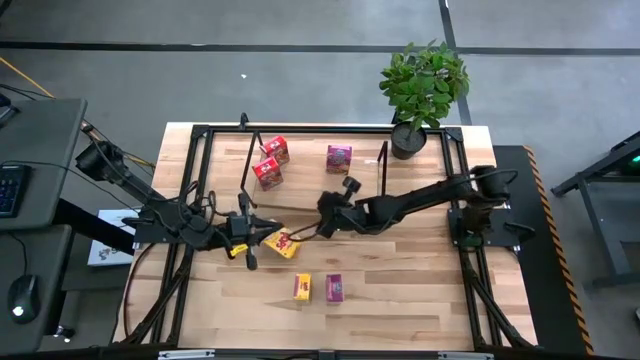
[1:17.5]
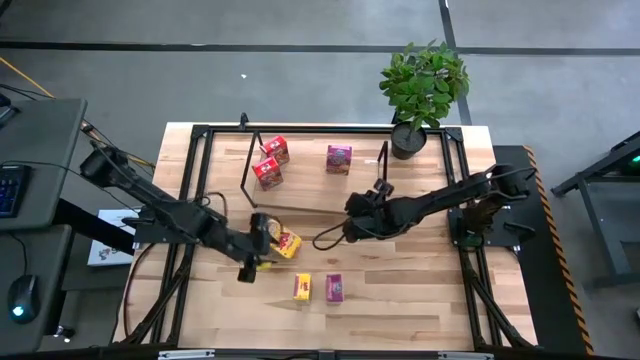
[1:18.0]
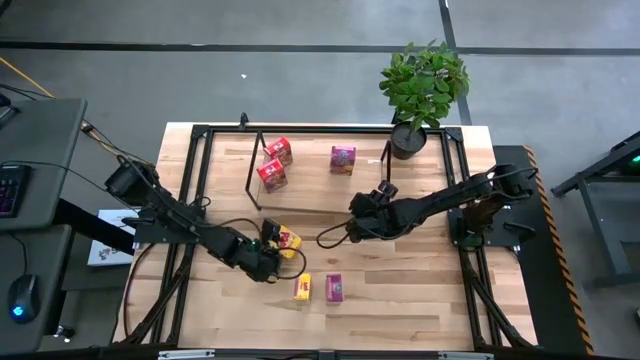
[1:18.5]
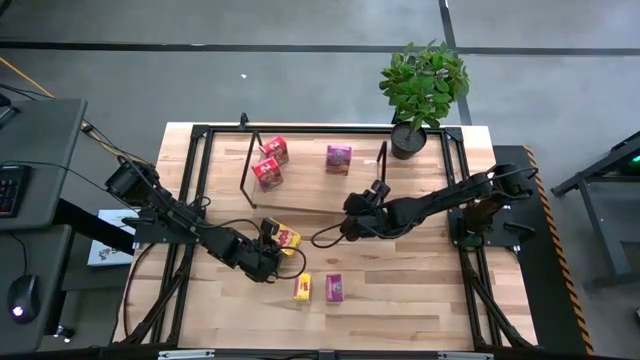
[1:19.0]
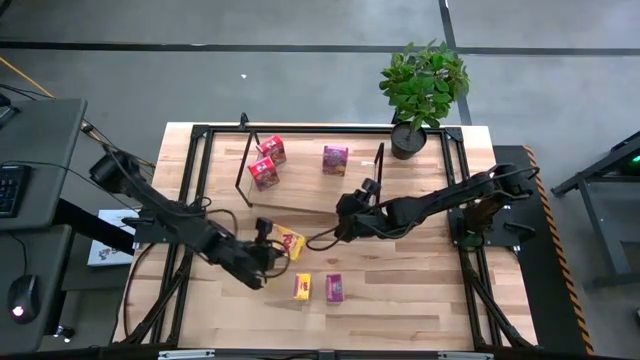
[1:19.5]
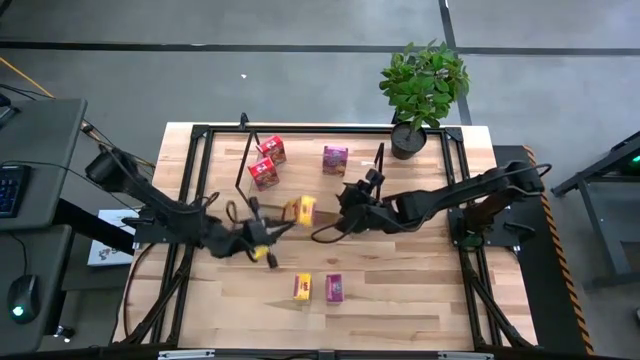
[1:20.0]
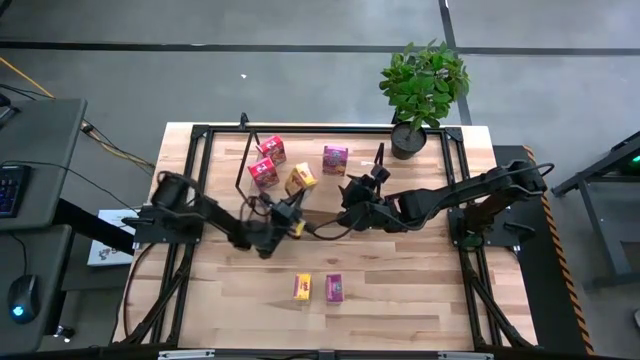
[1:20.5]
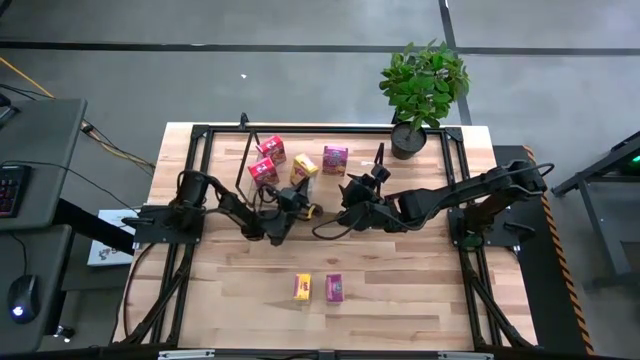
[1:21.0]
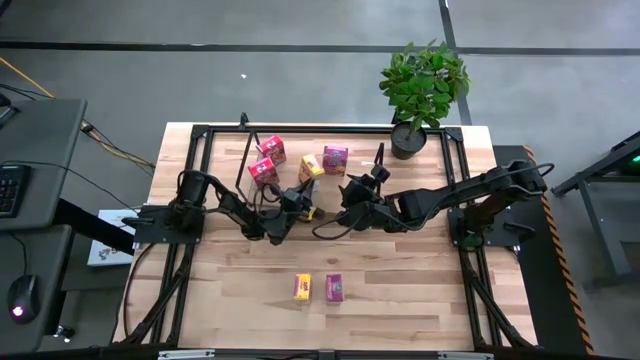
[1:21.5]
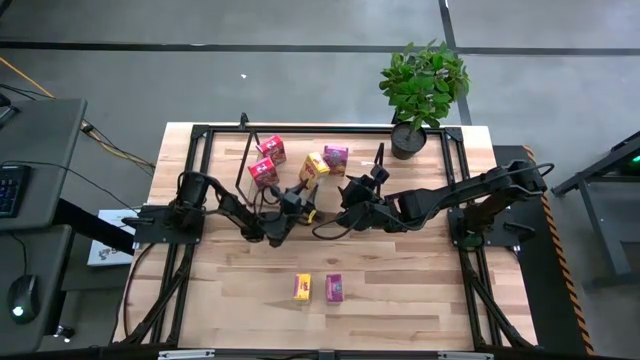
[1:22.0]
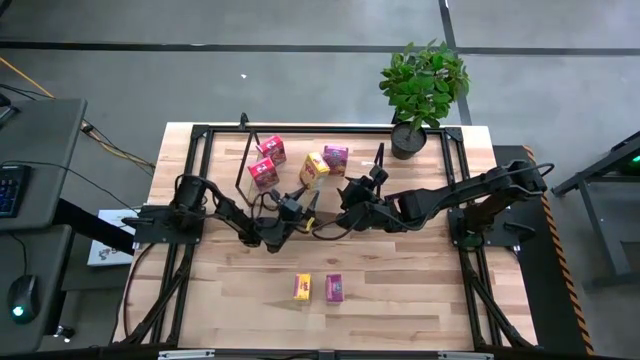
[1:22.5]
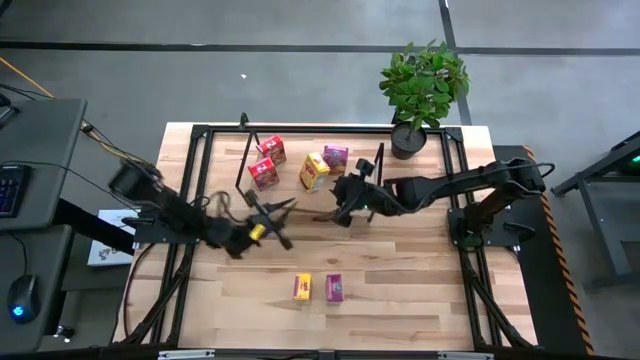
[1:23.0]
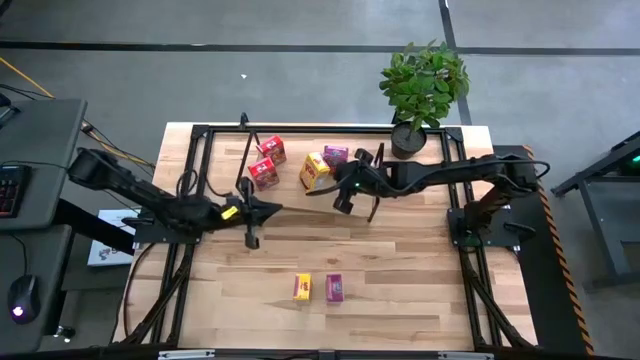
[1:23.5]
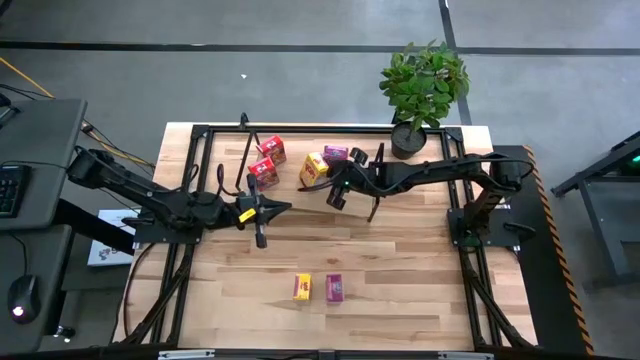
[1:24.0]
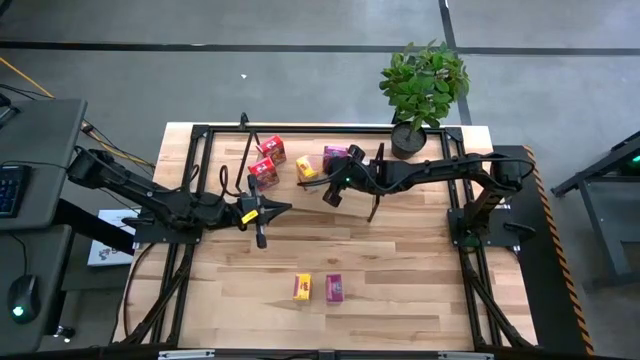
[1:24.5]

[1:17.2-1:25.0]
Task: Stack cereal on shelf
Put the yellow cereal box on the shelf

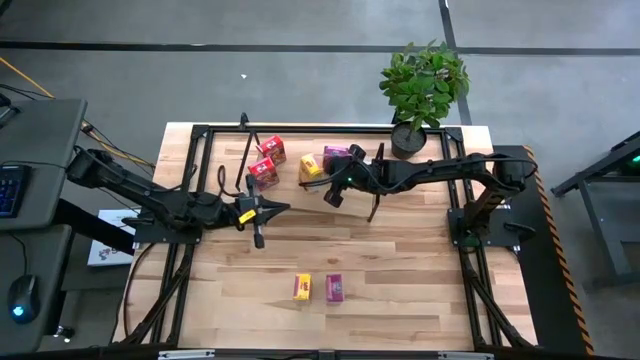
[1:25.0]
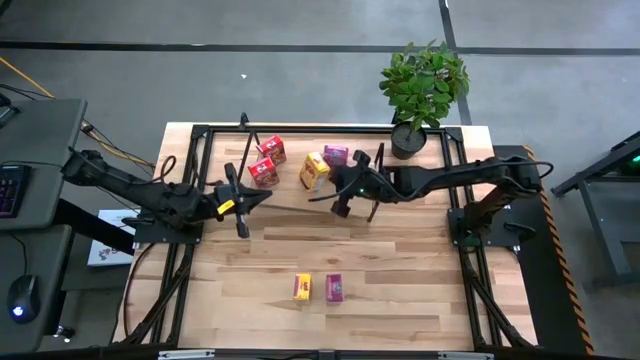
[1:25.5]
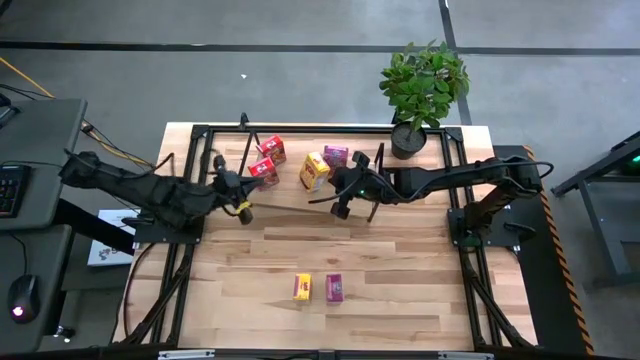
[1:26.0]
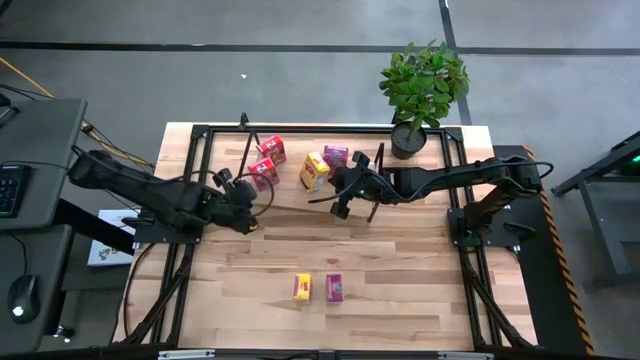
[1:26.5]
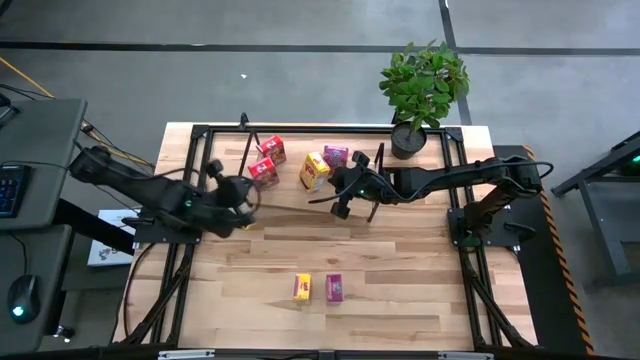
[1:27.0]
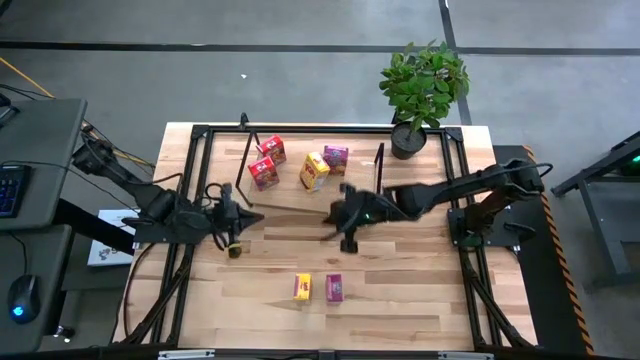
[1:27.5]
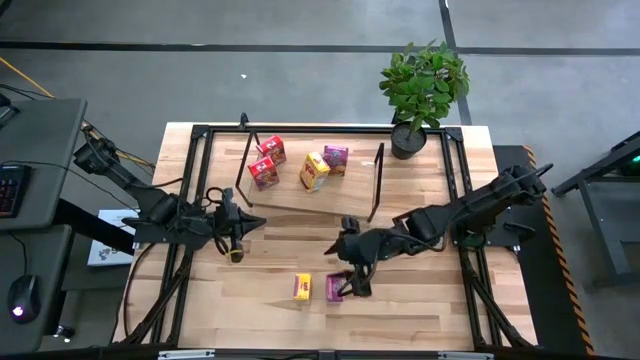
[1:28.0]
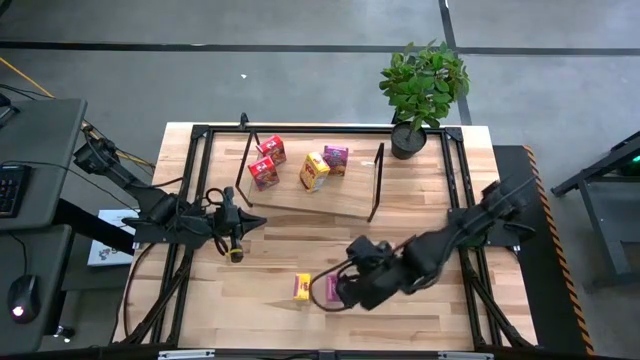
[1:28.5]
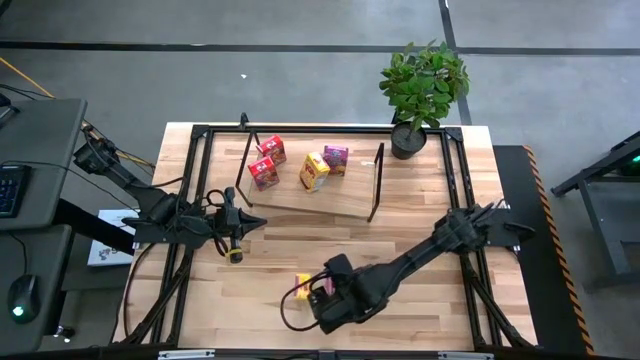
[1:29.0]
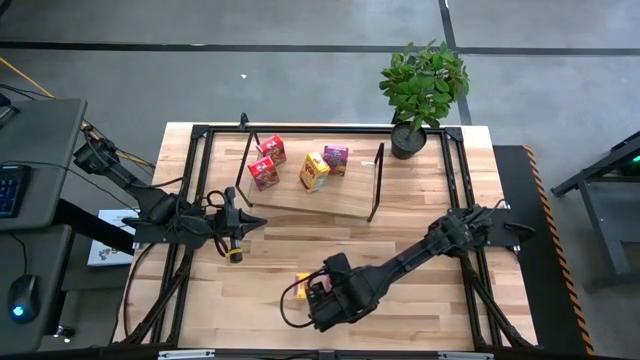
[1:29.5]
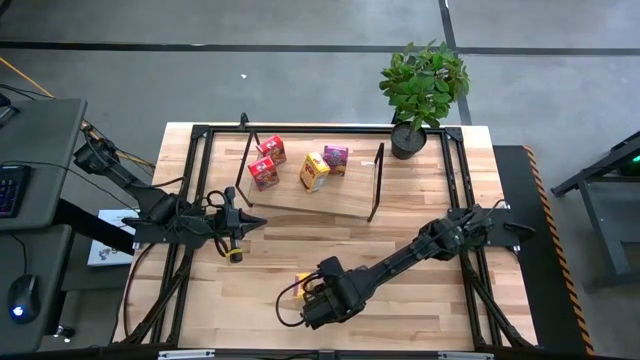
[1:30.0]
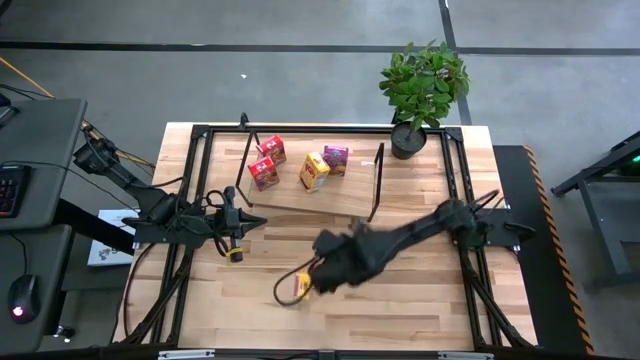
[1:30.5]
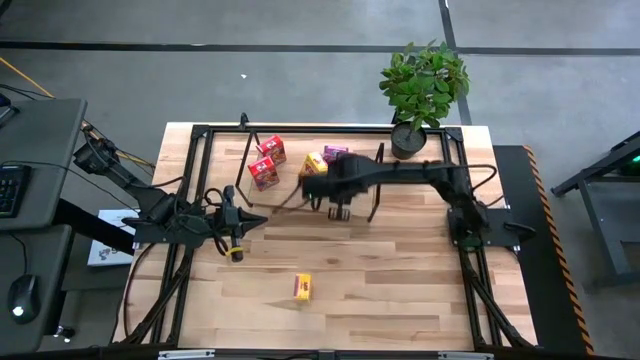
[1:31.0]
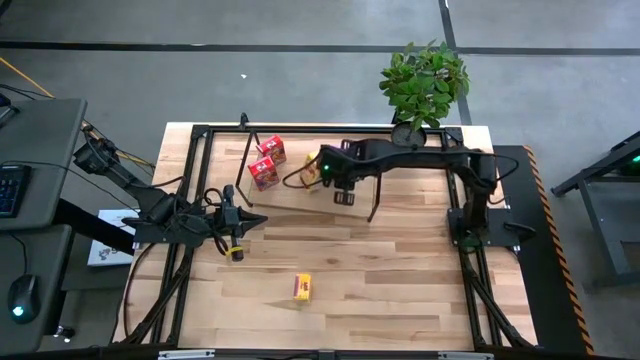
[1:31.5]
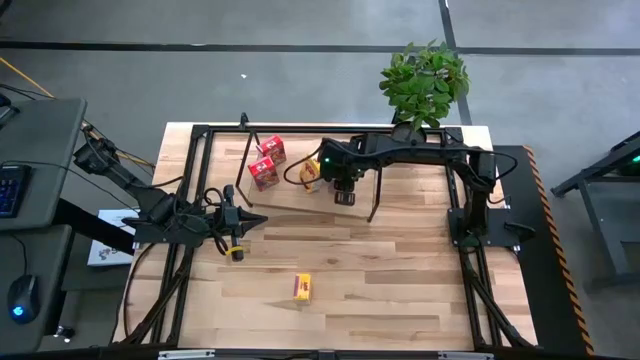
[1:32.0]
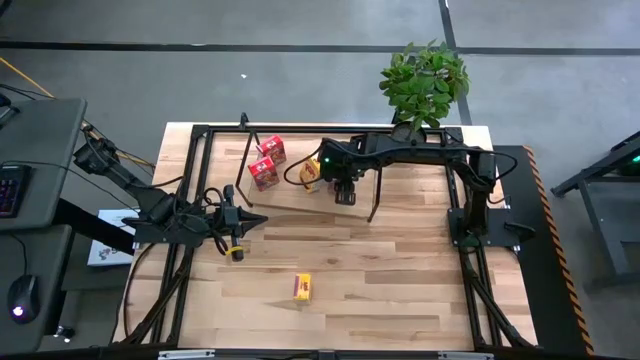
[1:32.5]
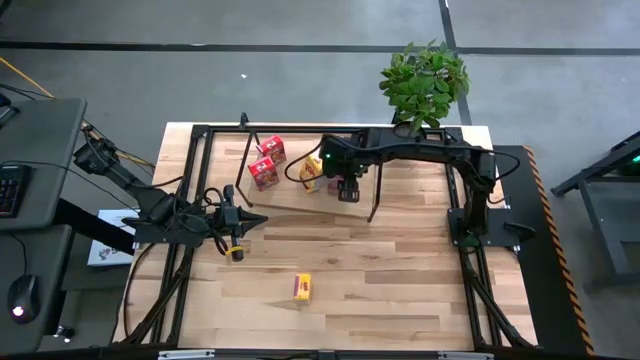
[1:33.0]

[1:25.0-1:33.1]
Put the purple cereal box on the shelf aligned with the other purple cereal box

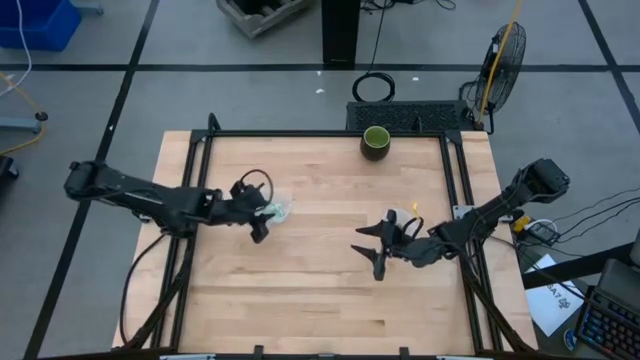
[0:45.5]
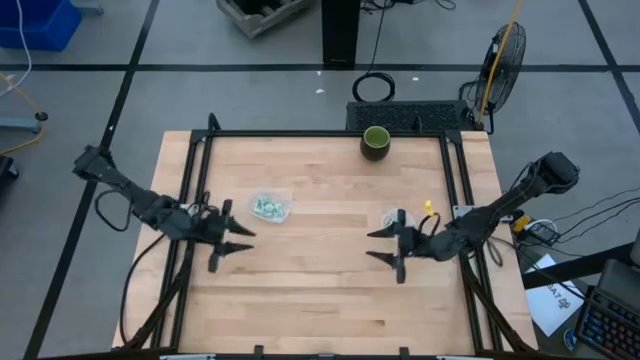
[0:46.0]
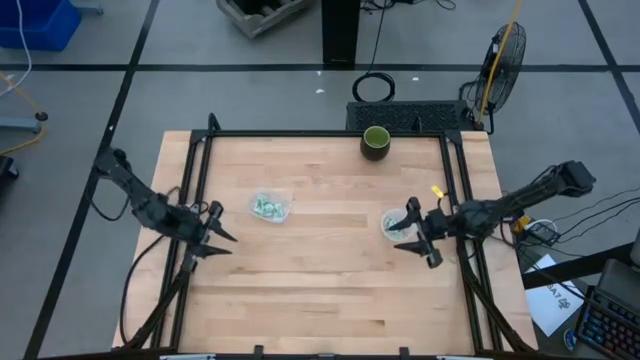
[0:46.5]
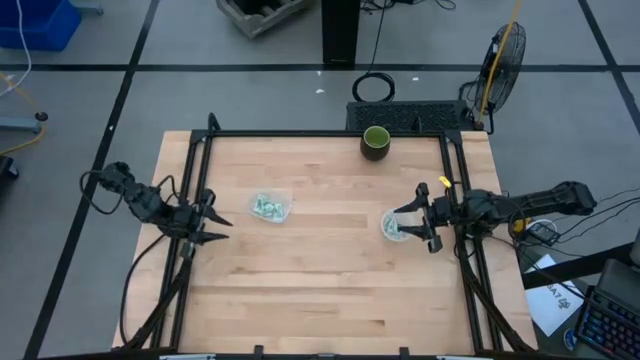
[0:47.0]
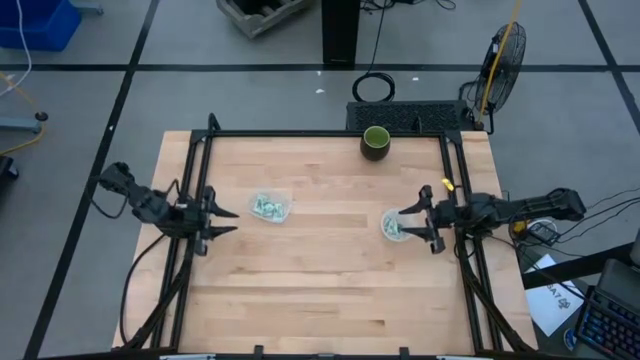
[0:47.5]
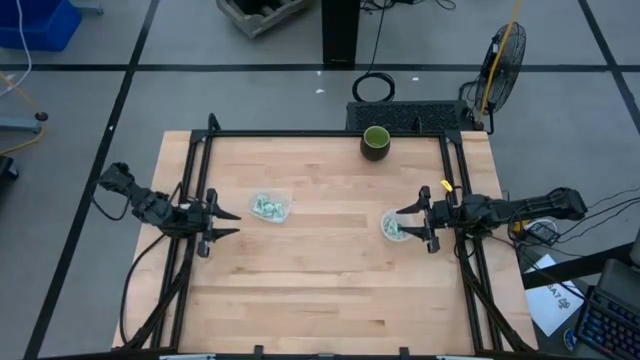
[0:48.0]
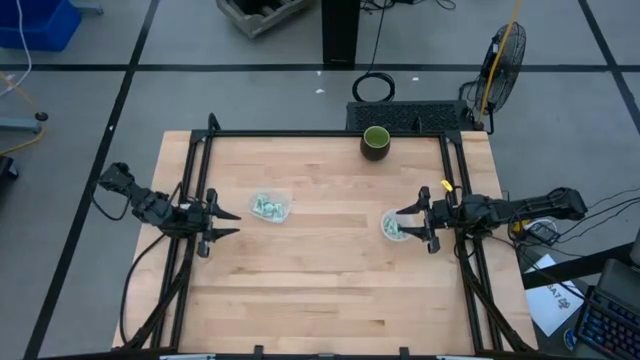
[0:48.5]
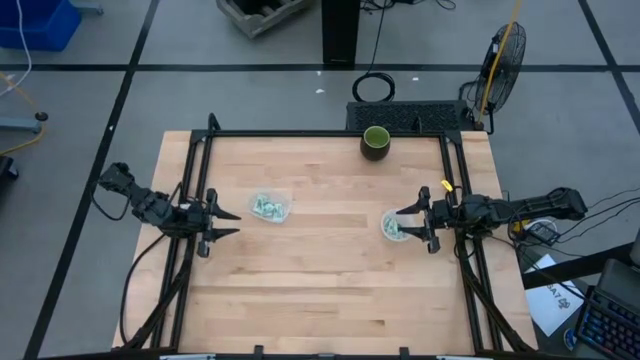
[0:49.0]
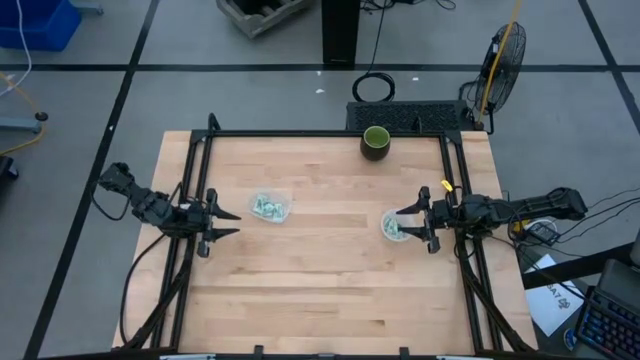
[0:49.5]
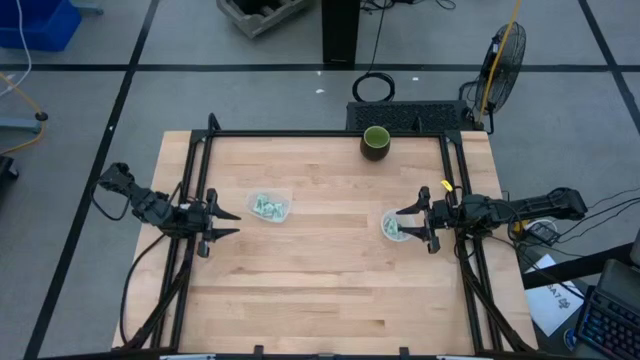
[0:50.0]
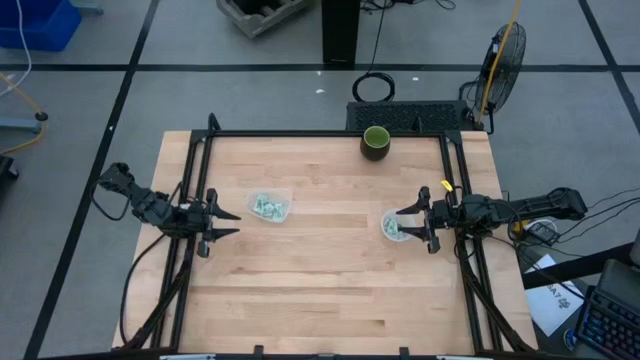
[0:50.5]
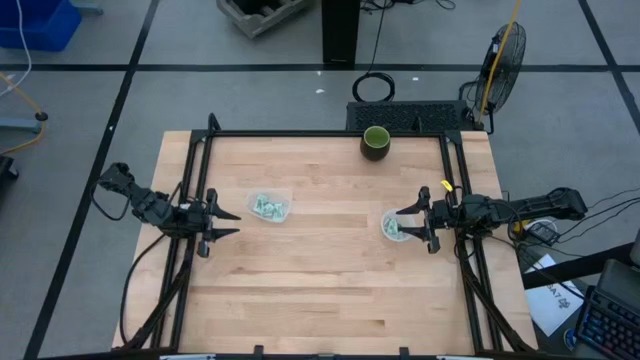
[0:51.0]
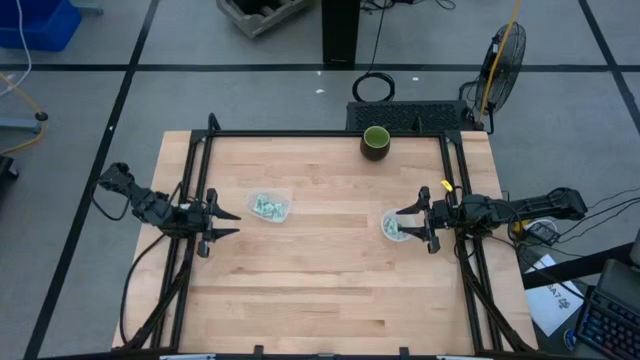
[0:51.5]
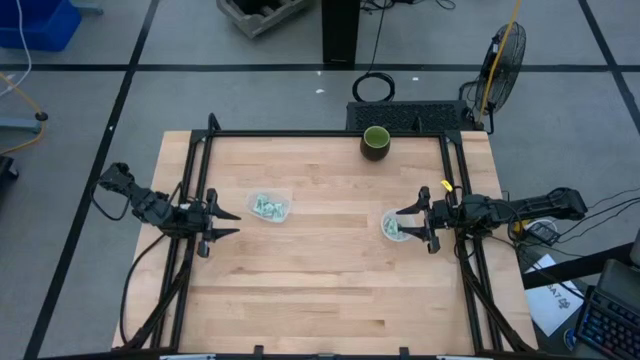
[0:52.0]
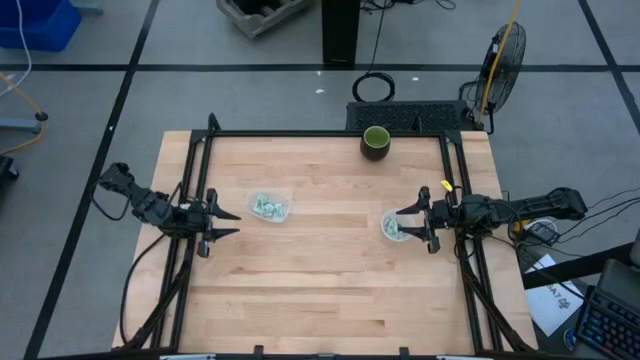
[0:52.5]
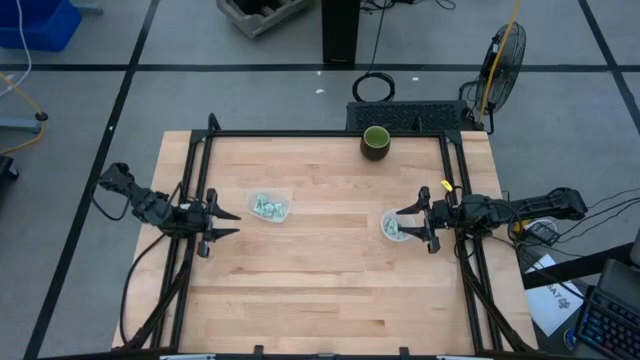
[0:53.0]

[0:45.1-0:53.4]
Task: Pick and place Stevia / Truvia into bins
Return to Home Position
